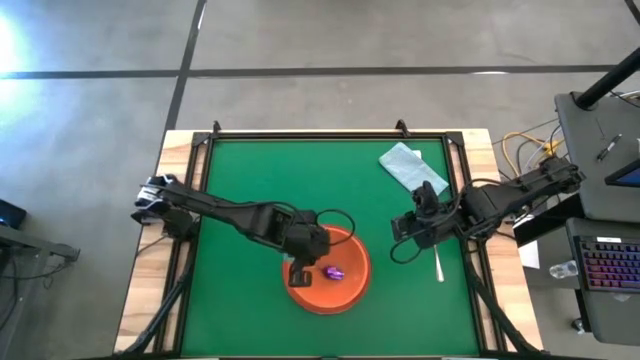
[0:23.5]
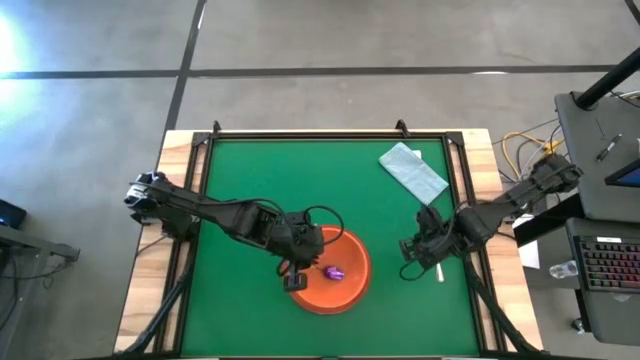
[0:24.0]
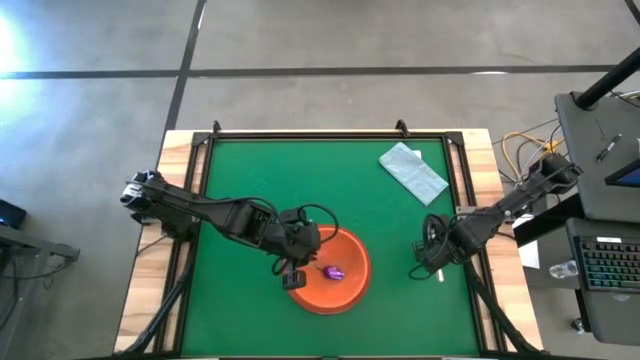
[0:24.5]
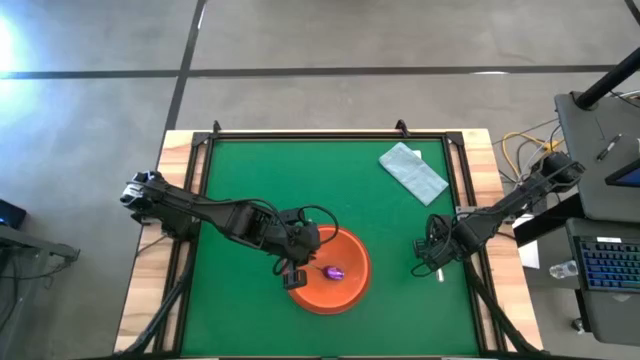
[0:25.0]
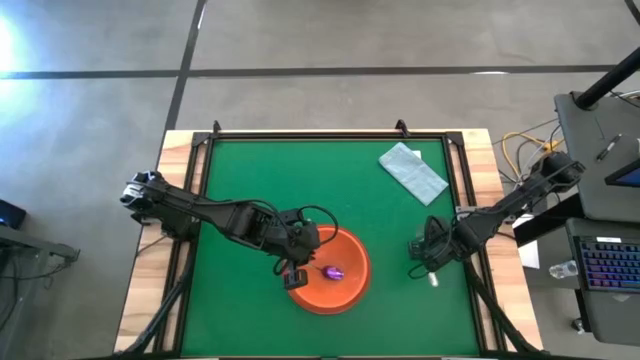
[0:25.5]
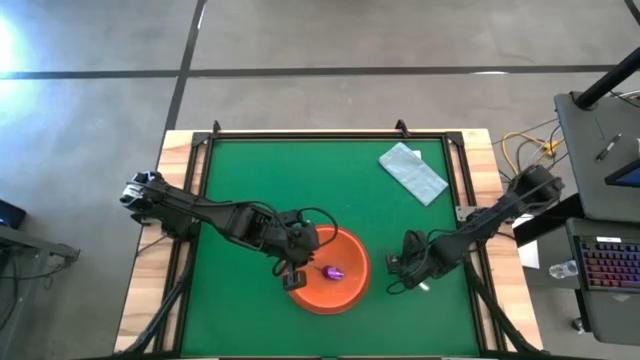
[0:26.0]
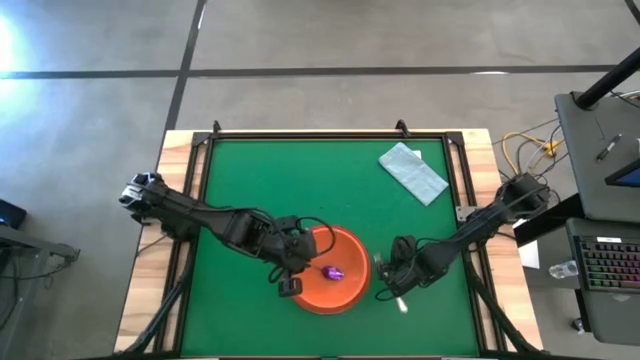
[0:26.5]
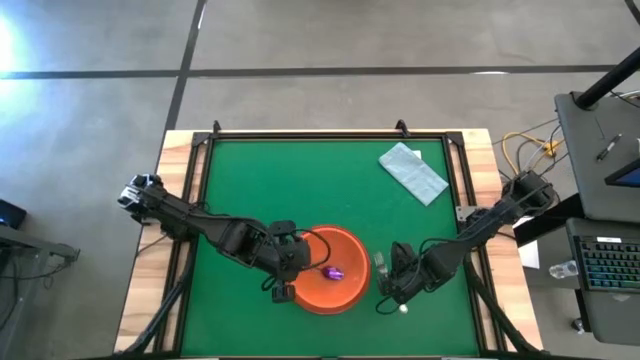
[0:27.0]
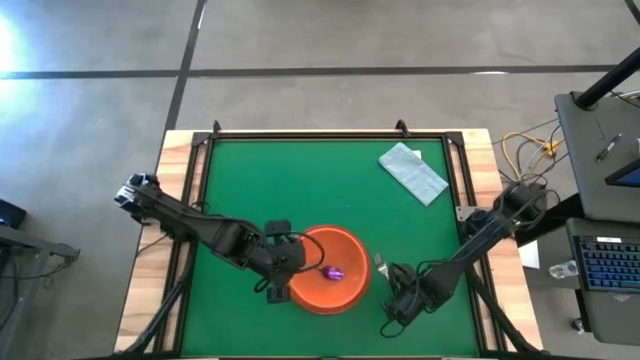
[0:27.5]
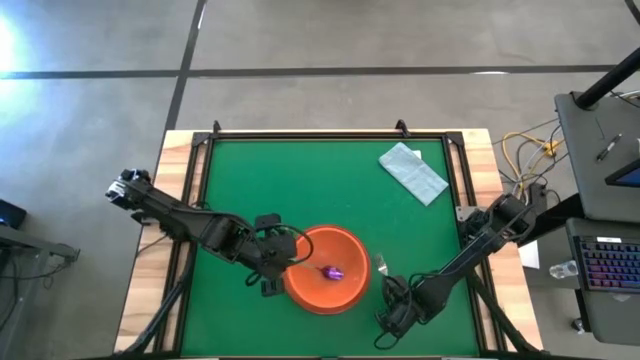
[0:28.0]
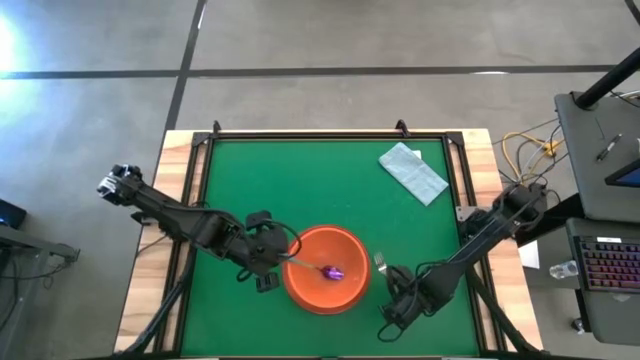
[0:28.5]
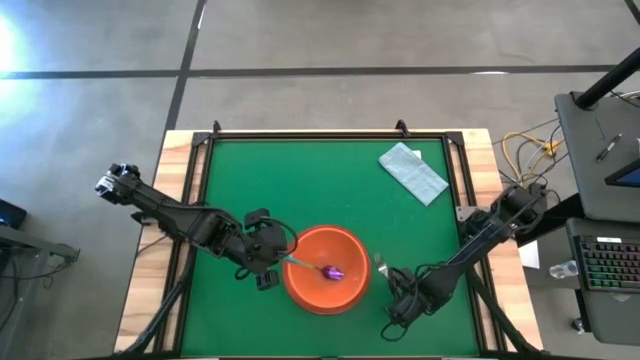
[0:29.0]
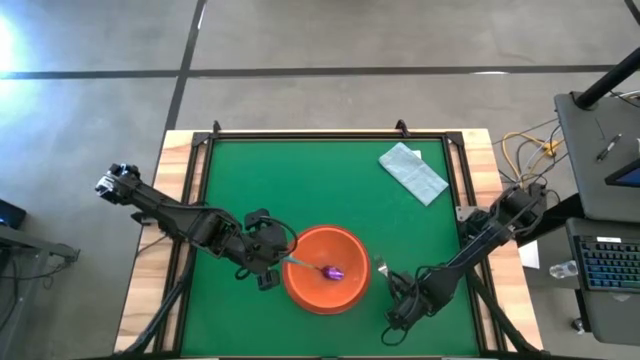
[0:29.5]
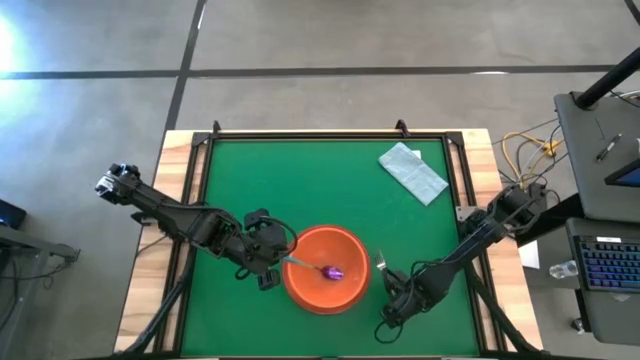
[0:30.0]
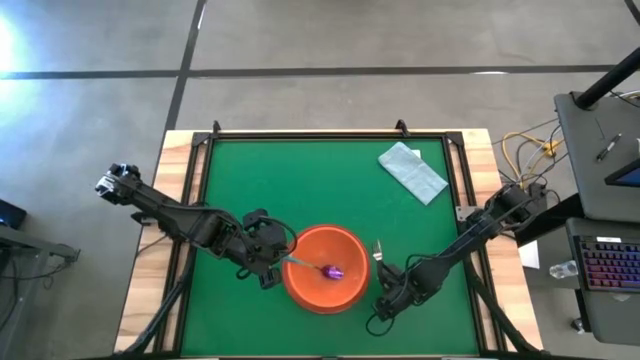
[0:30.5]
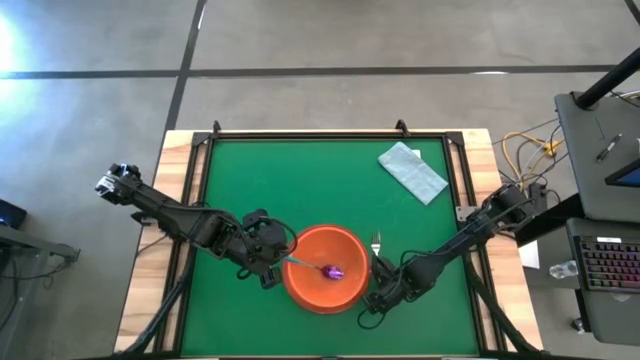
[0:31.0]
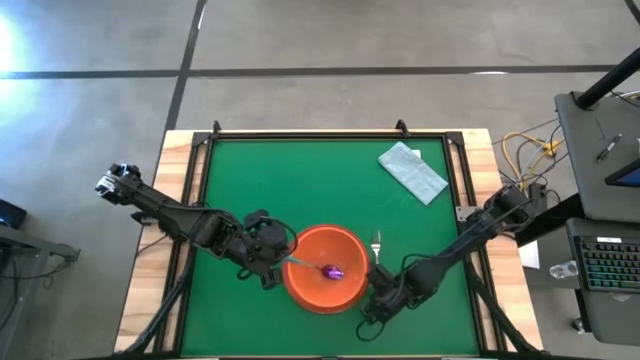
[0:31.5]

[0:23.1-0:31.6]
Task: Set table place
Move the fork to the right of the orange plate on the table

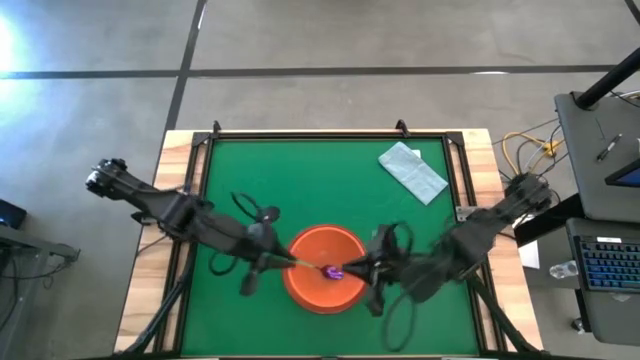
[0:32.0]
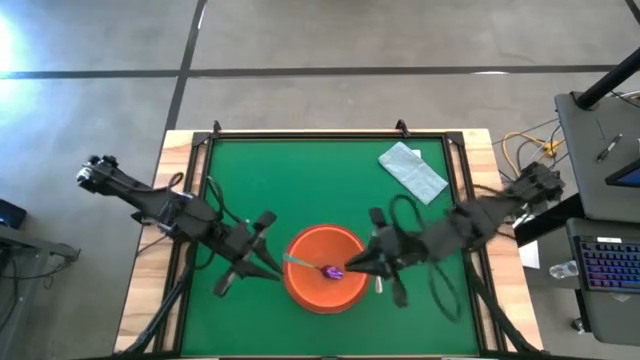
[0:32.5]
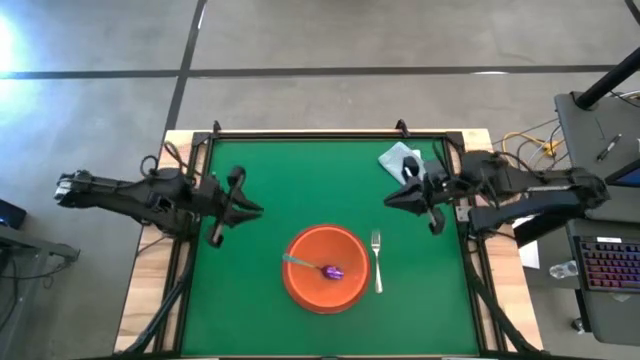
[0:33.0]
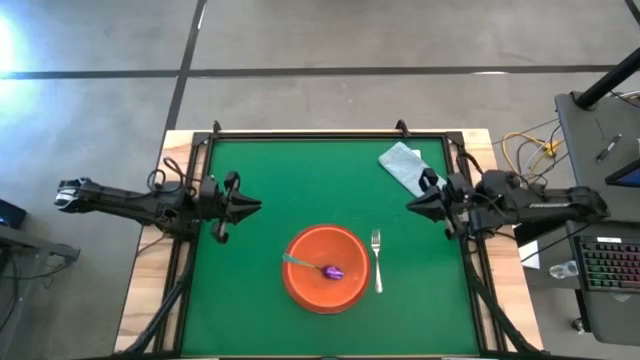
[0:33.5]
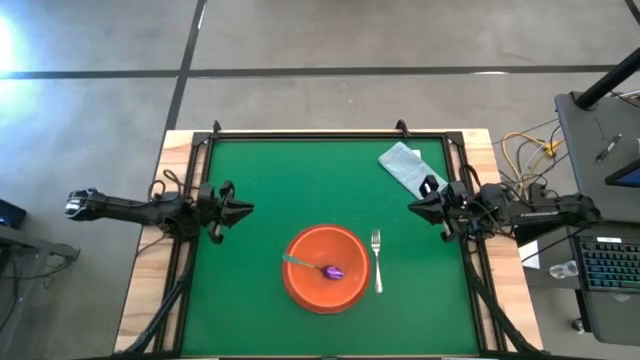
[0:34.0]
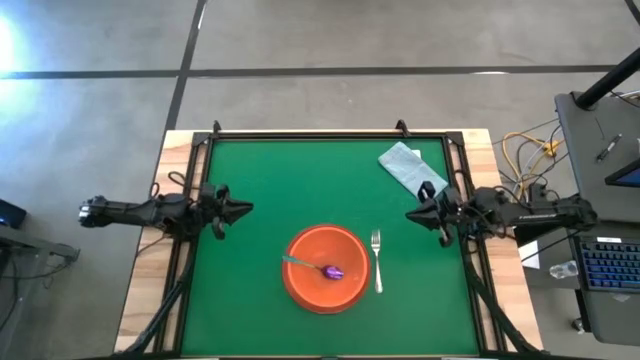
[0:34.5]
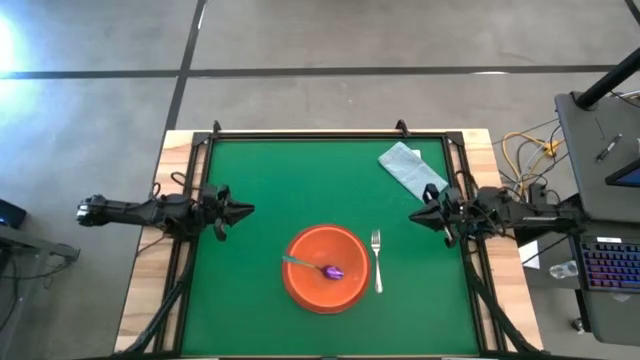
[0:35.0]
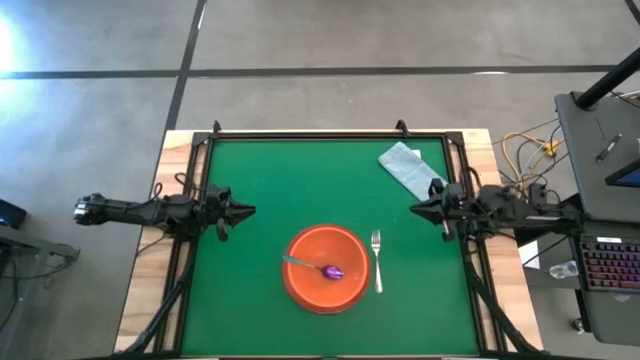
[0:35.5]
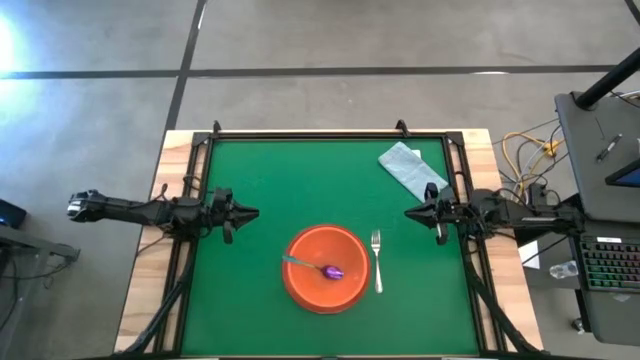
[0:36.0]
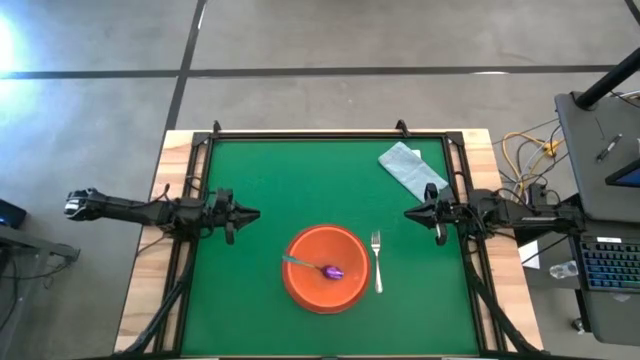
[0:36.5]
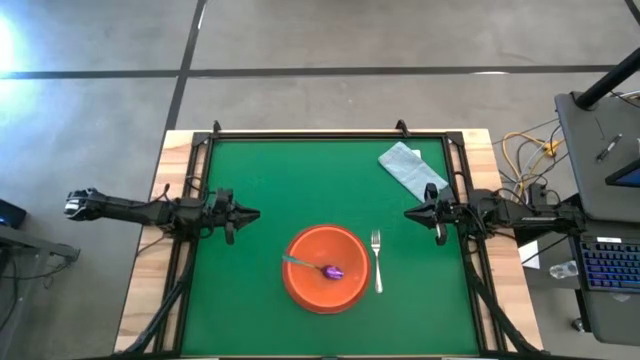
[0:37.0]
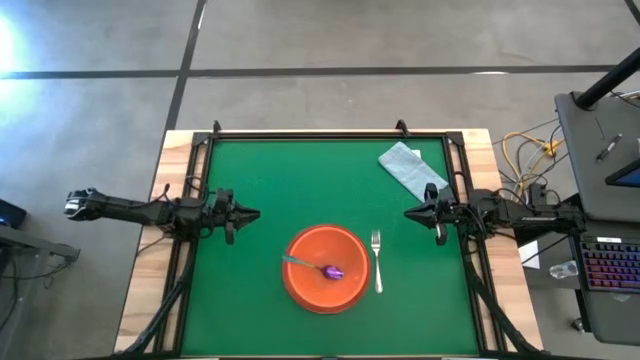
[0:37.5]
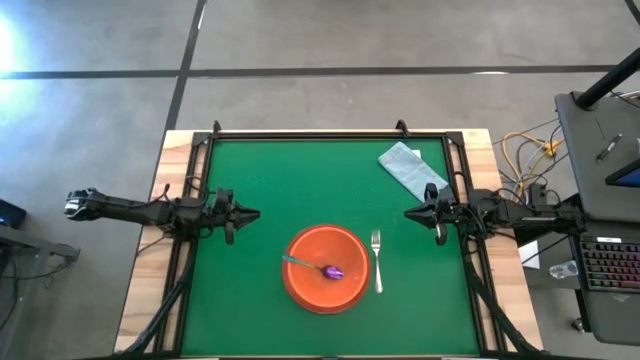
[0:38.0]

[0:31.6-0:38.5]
Return to Home Position

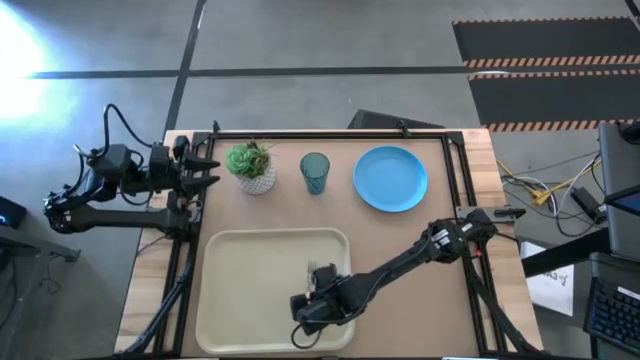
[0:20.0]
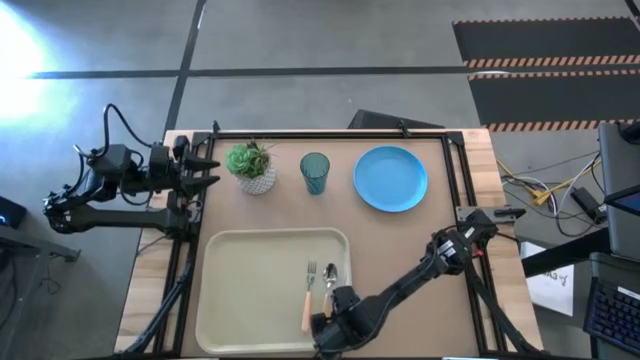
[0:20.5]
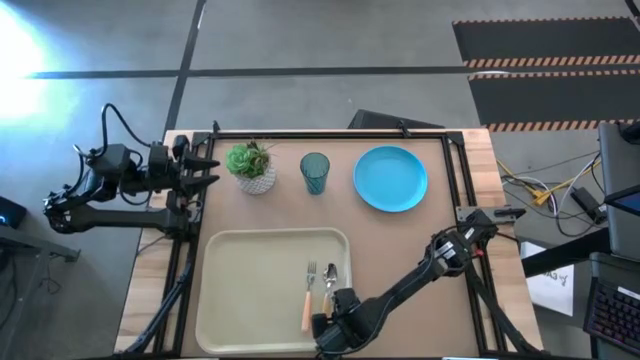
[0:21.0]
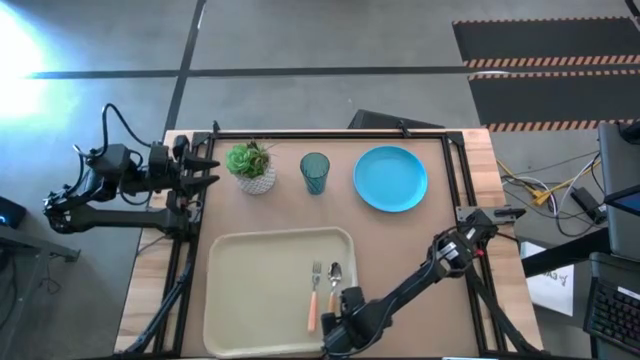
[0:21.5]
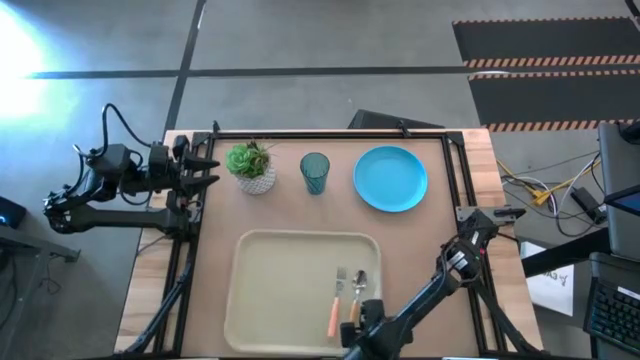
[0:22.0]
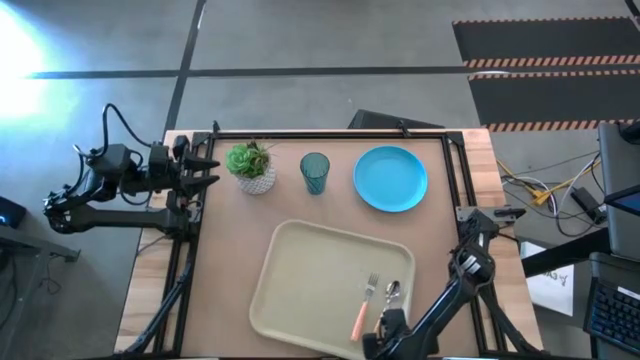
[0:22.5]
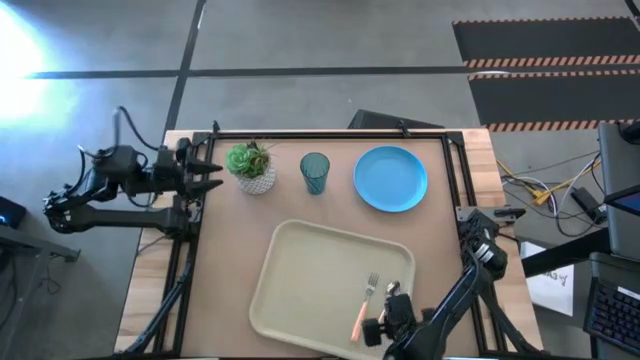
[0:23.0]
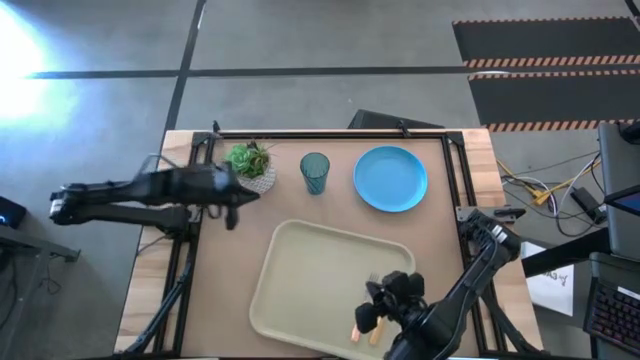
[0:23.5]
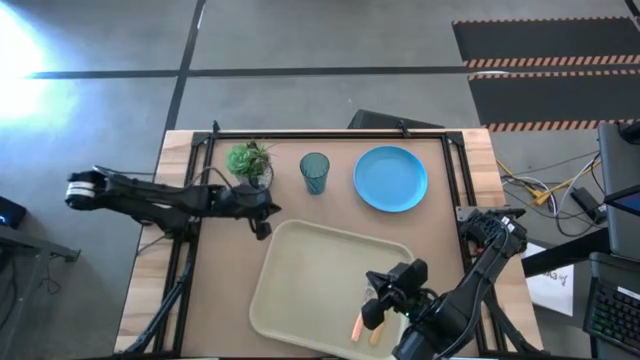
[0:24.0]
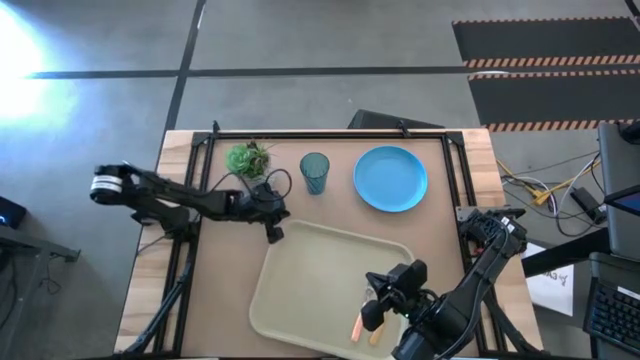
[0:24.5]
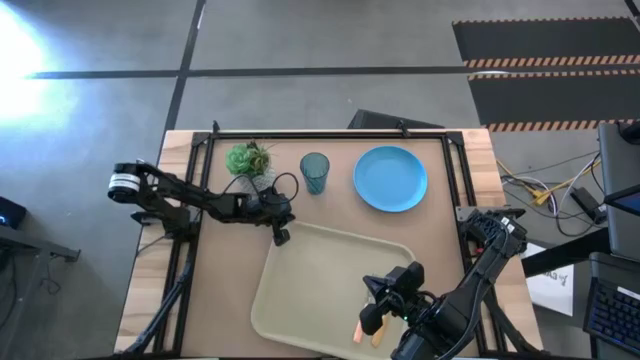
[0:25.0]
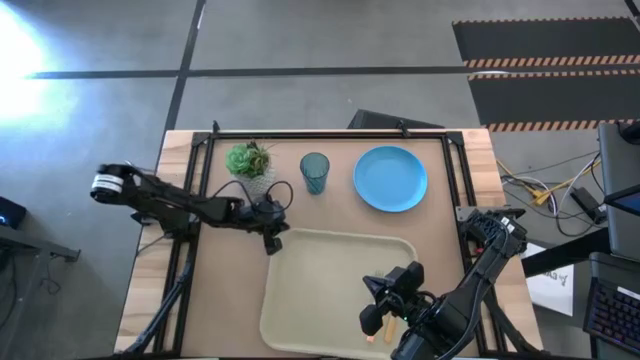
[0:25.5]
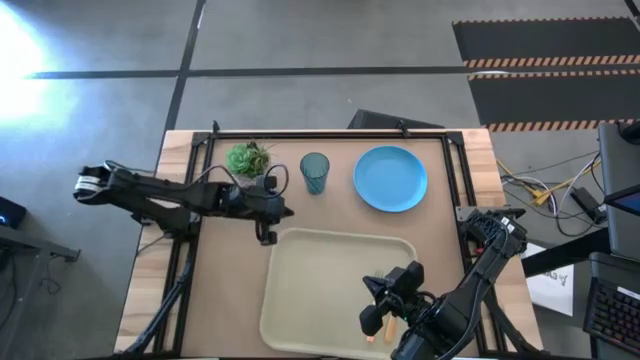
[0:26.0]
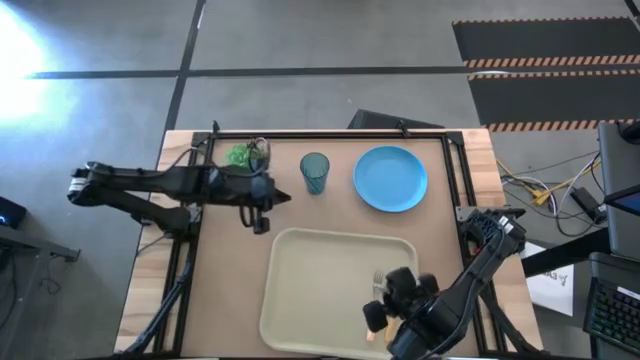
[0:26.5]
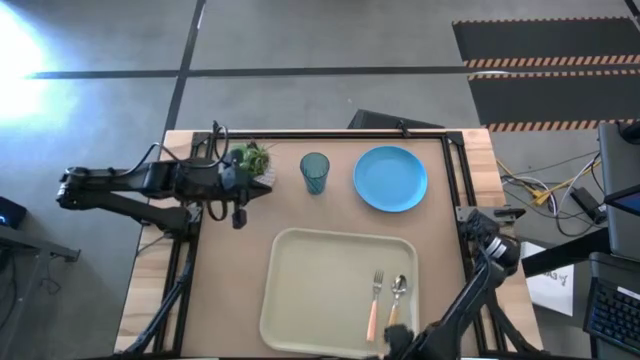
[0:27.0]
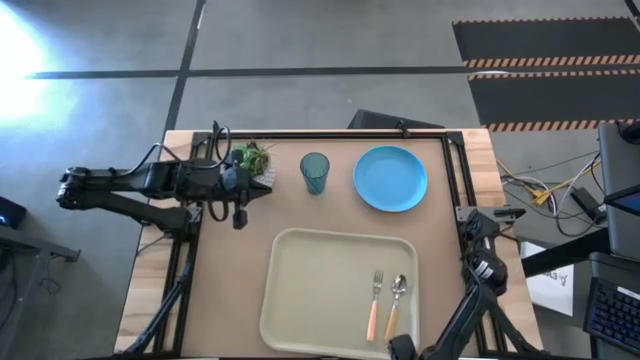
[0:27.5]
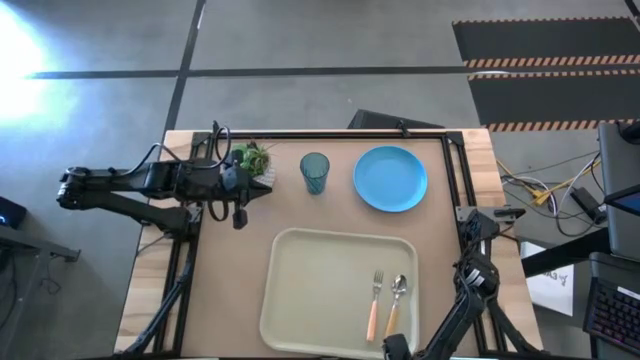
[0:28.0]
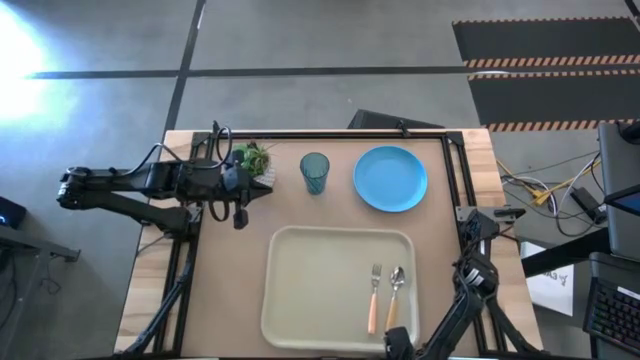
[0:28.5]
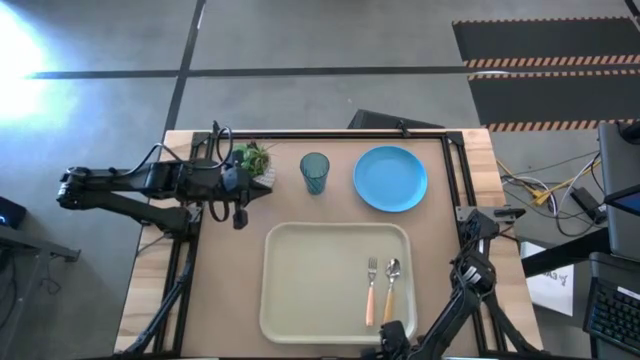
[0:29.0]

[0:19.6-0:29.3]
Task: Pick and place plate/cup/fork/spoon on tray
Move the gray tray to the bottom center of the table
